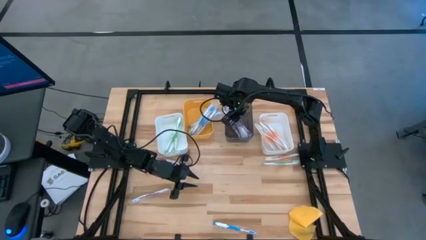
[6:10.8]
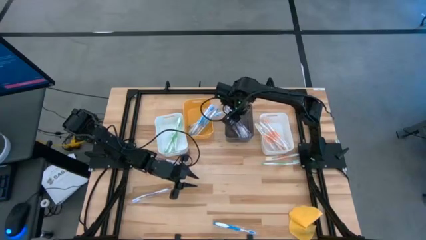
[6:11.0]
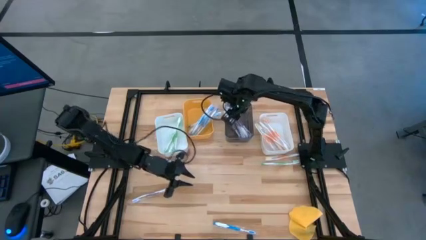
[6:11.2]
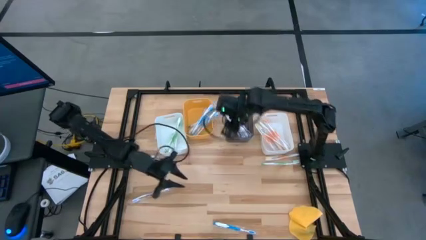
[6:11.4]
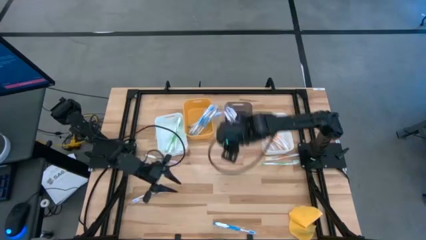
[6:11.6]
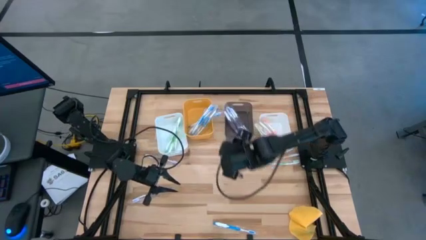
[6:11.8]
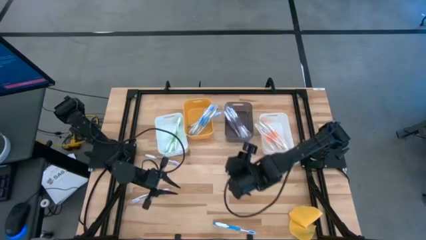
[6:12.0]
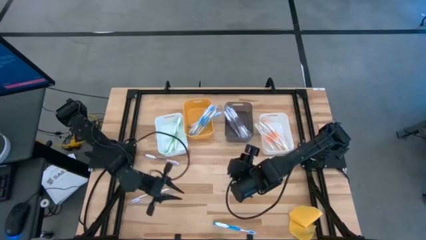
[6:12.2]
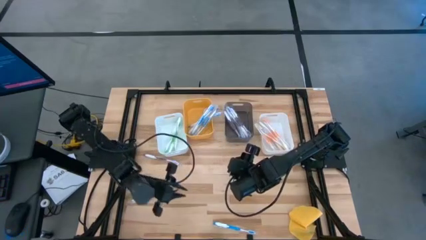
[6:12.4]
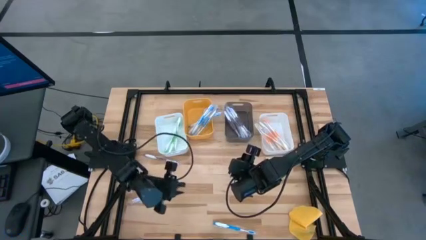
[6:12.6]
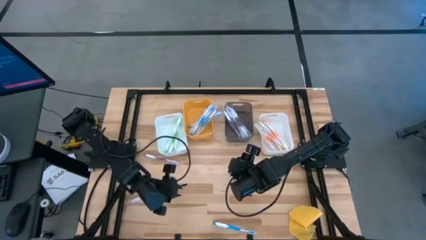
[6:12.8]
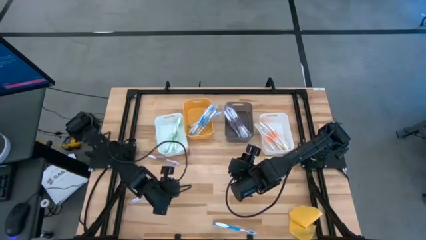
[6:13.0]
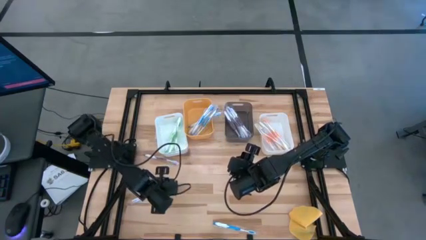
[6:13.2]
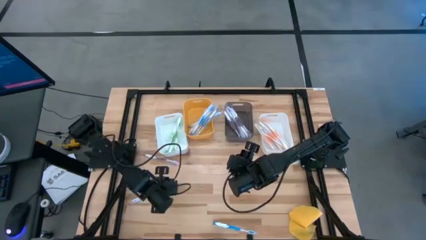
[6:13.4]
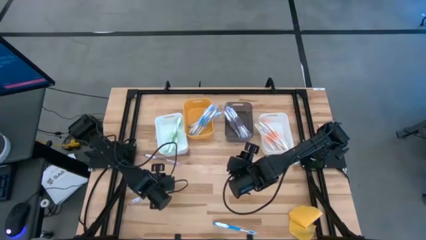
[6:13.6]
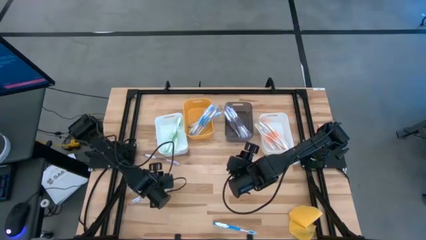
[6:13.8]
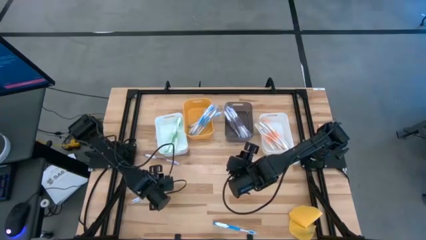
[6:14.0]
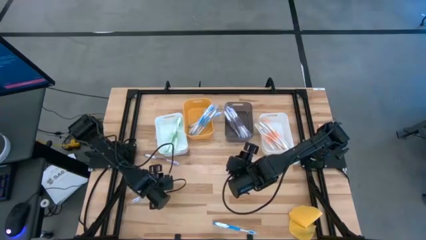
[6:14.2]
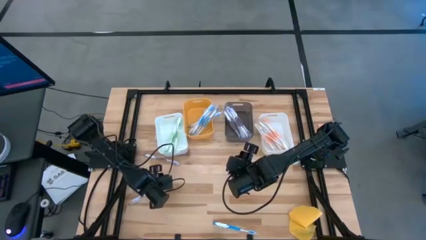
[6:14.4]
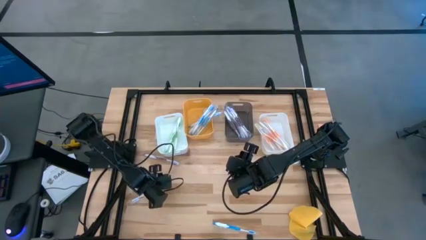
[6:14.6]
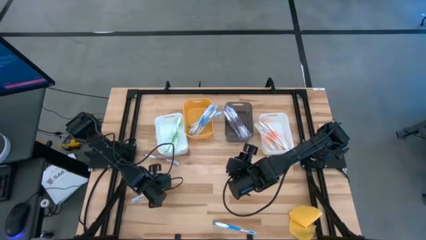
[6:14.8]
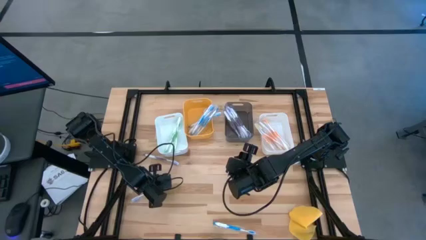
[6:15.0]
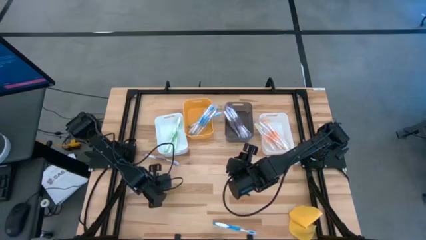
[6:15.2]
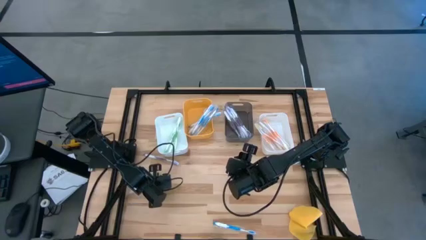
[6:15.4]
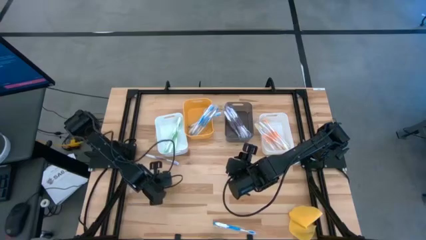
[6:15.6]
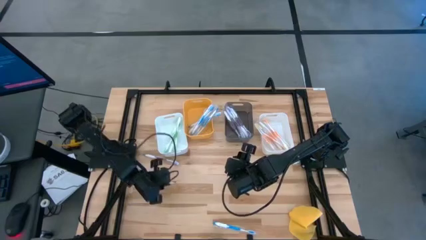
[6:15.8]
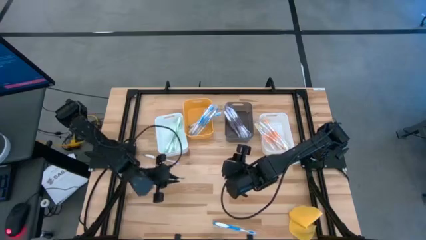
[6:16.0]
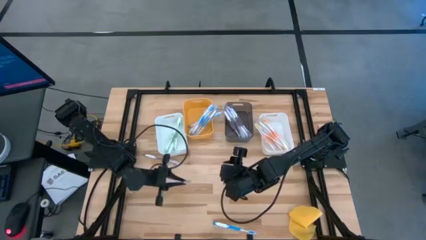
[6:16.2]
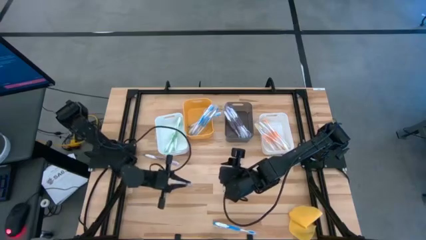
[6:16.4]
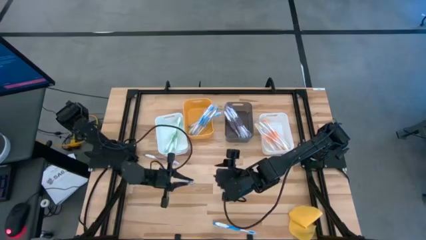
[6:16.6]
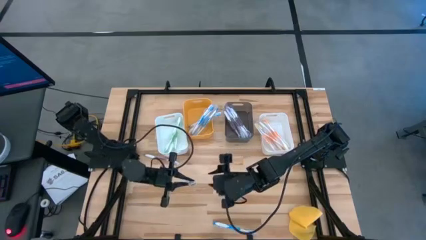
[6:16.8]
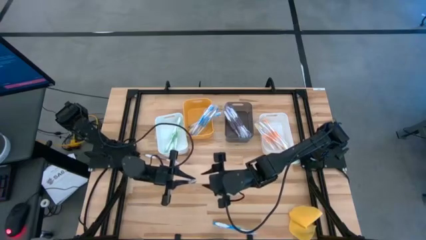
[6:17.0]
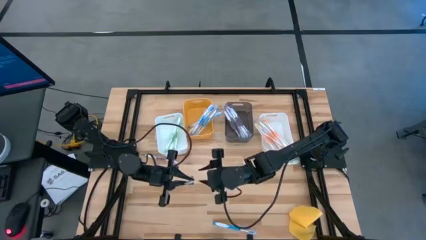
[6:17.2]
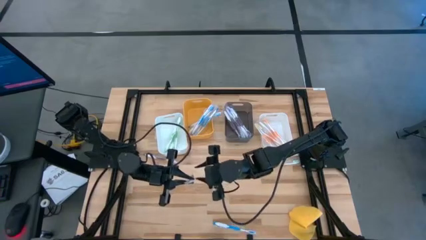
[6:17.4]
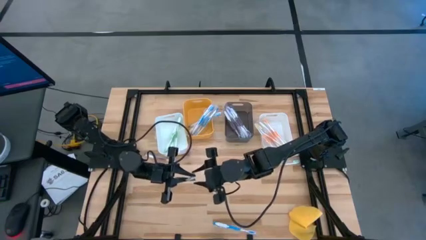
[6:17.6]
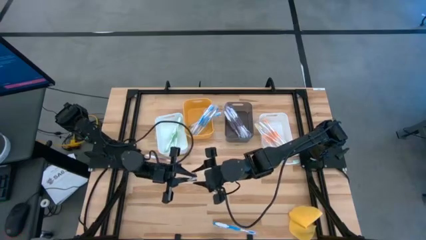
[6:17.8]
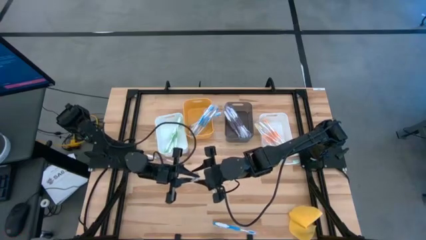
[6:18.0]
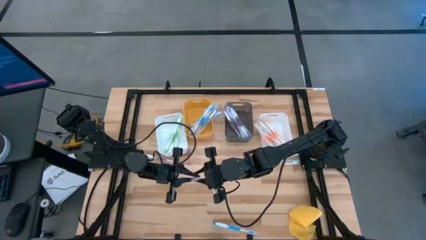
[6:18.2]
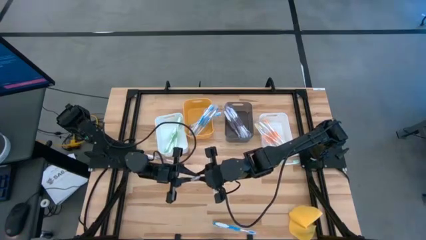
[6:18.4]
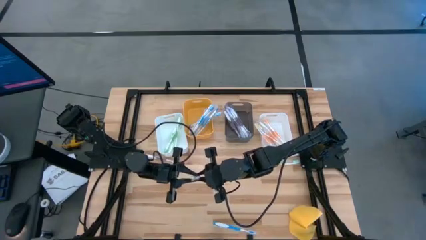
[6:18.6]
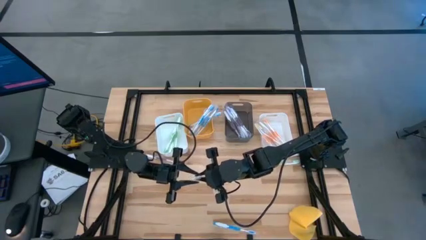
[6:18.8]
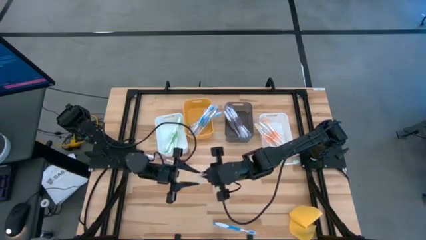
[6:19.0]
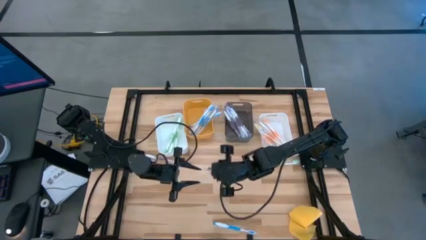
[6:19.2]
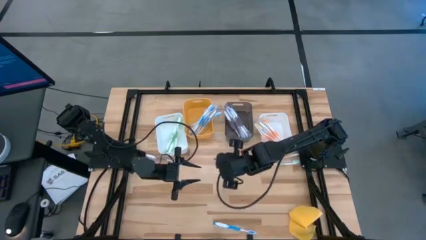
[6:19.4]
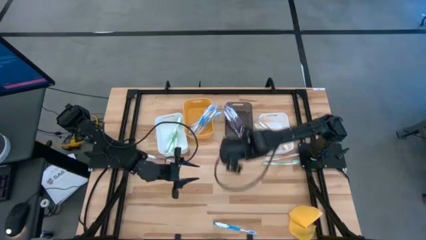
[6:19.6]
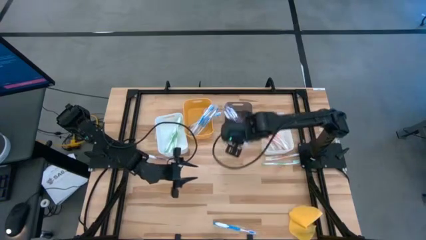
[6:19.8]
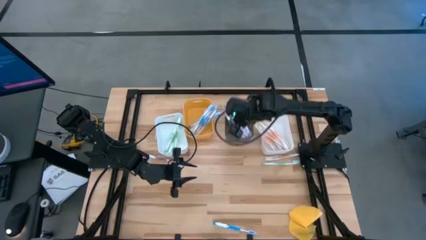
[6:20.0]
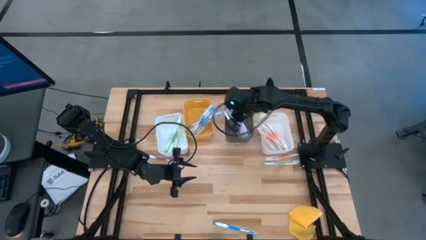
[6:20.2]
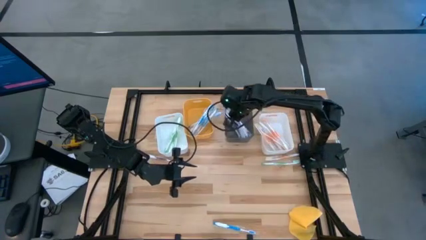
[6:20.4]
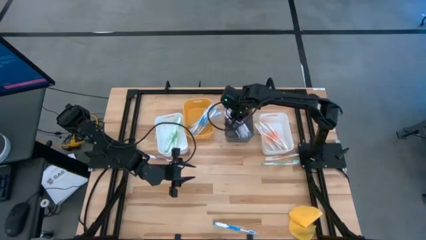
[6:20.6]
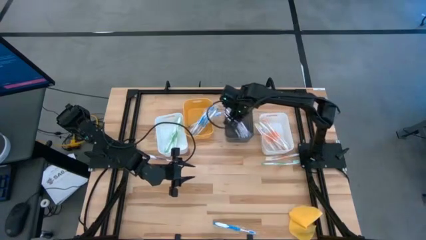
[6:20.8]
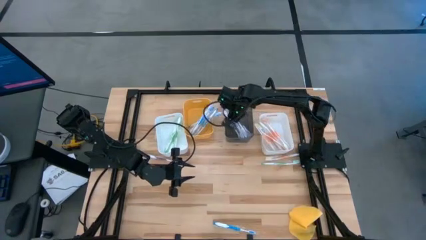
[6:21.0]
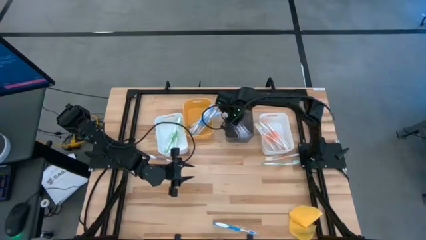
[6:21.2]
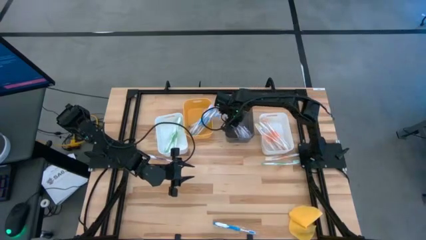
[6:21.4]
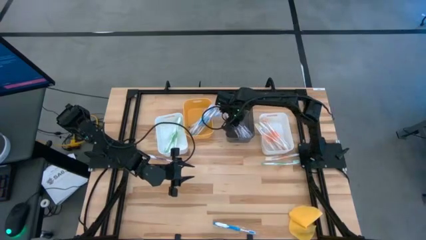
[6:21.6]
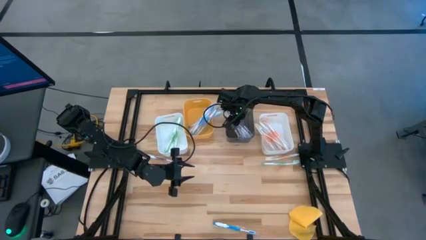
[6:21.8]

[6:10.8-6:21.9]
Task: Pick & Place Toothbrushes
Put the bottom purple toothbrush into the black transparent bin

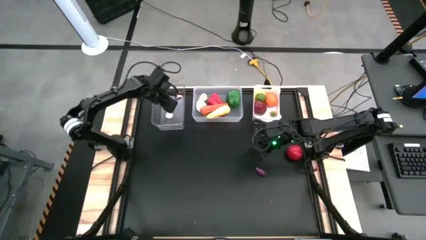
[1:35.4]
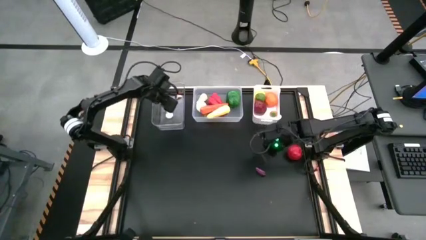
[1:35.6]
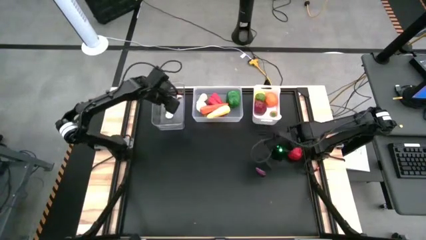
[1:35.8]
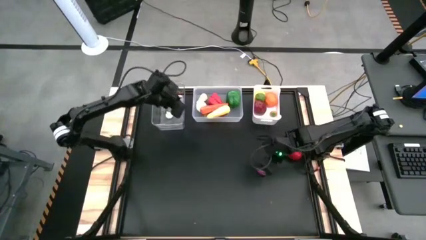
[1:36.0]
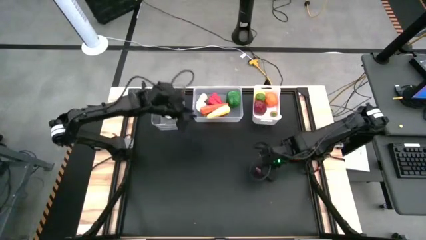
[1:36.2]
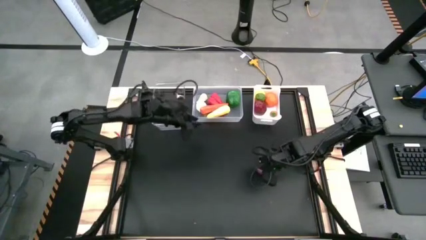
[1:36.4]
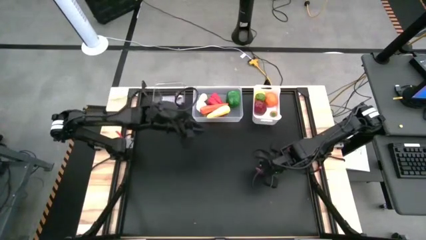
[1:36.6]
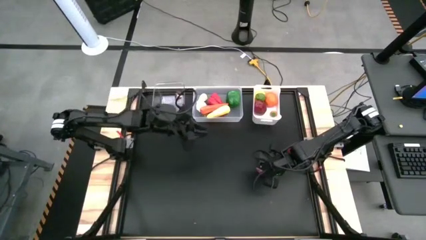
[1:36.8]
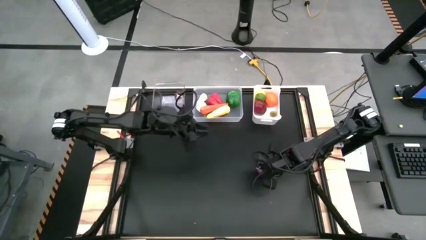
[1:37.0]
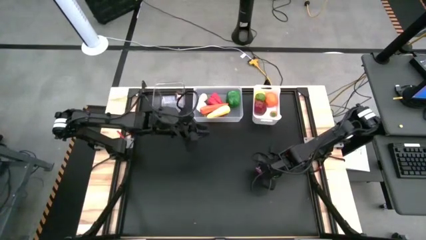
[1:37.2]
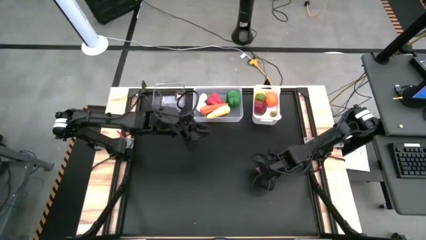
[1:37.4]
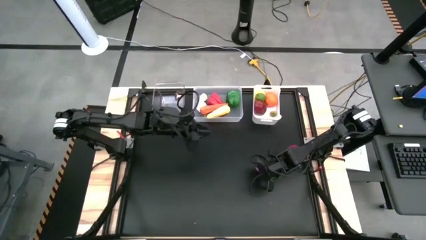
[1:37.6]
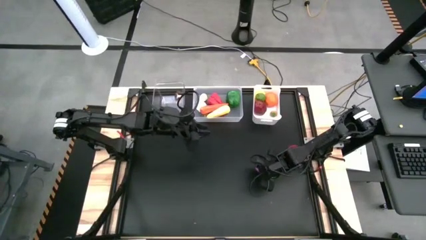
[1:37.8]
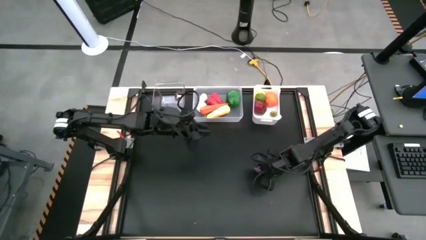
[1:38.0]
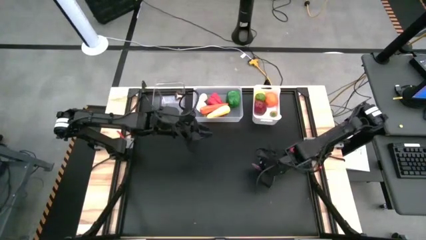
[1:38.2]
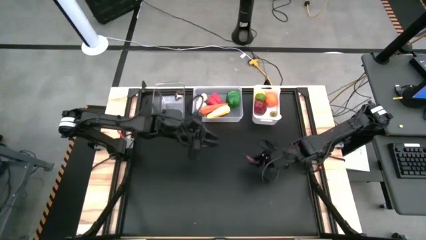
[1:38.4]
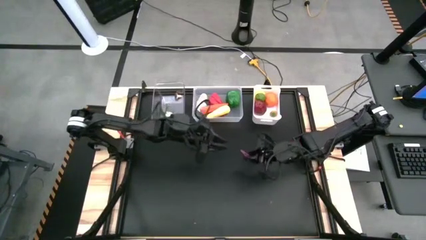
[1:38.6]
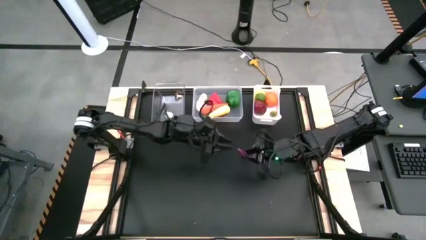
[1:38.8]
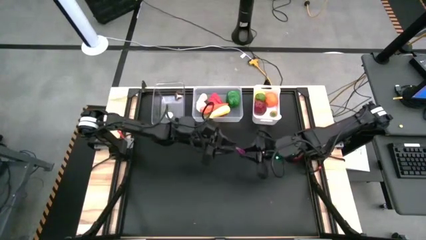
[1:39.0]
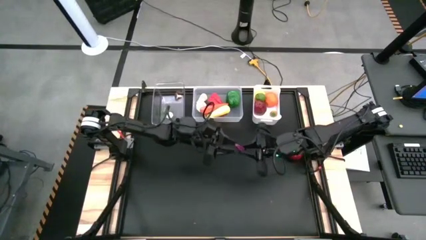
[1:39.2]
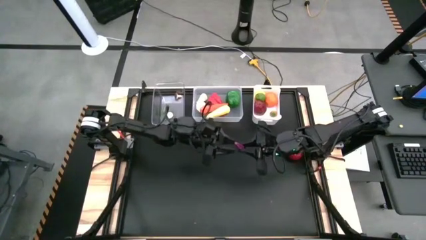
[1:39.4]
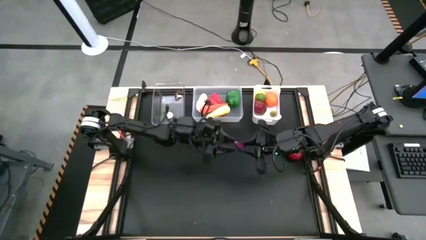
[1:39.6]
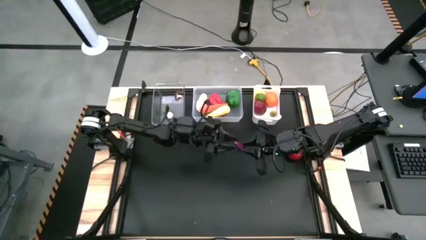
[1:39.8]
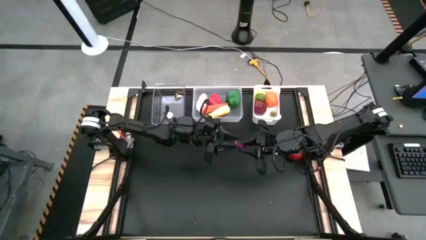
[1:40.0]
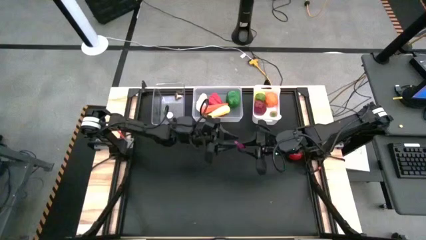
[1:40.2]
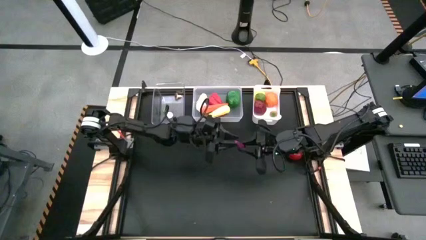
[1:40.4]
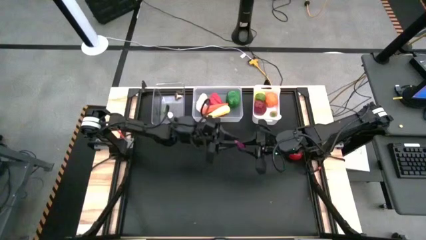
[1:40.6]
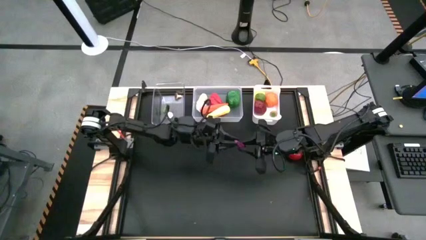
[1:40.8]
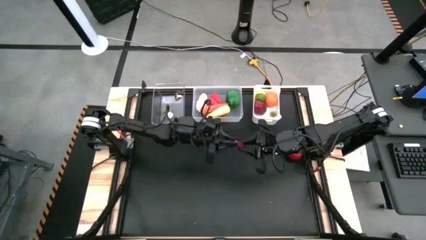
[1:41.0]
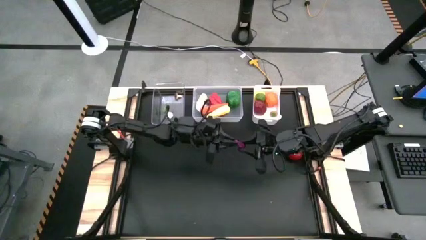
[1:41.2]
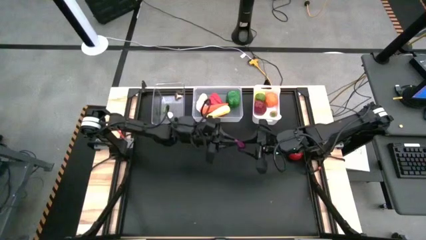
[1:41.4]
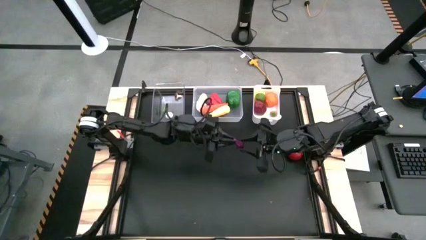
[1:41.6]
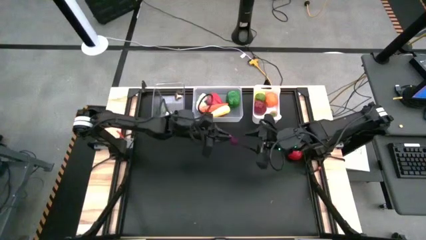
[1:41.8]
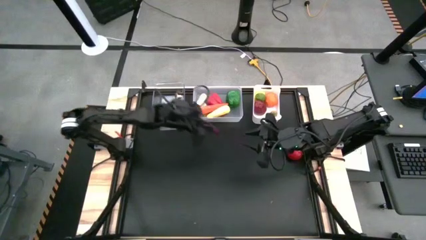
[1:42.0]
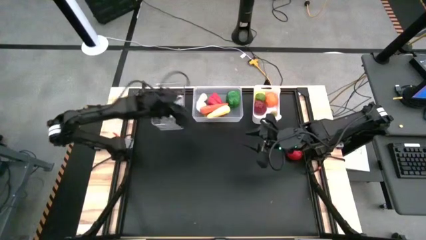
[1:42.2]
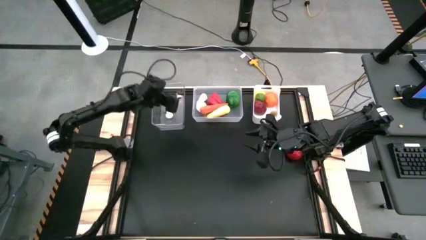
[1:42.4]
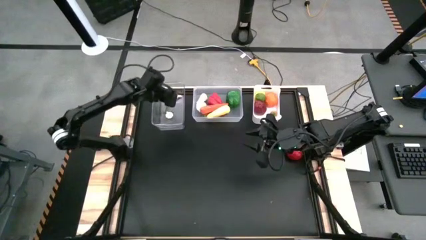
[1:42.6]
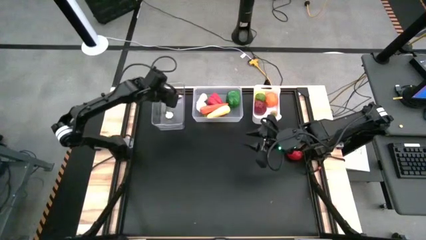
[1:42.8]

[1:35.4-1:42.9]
Task: Sort produce into baskets
Put the violet eggplant into the glass bin
